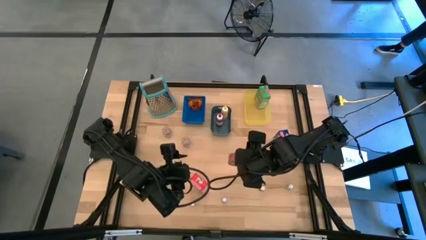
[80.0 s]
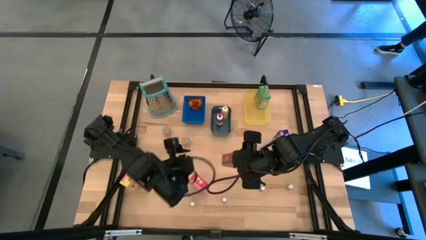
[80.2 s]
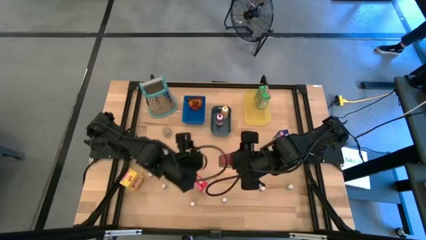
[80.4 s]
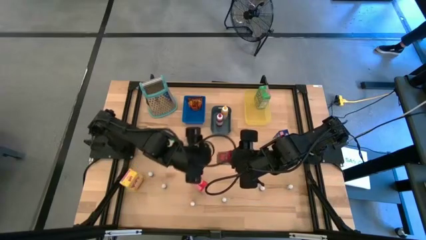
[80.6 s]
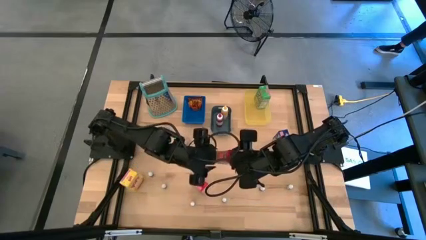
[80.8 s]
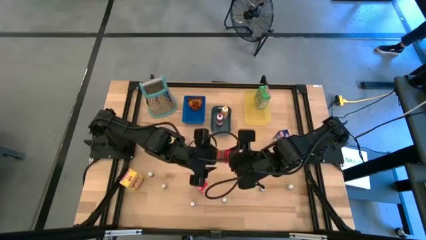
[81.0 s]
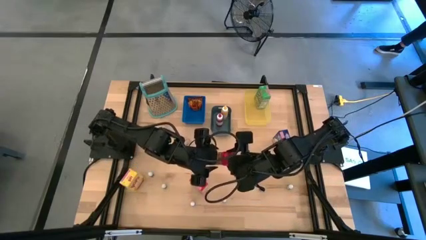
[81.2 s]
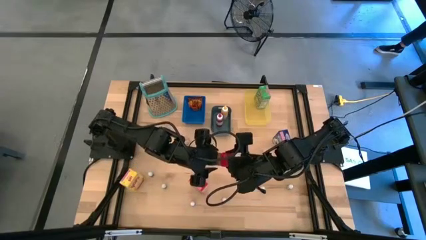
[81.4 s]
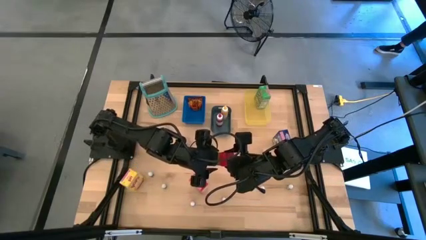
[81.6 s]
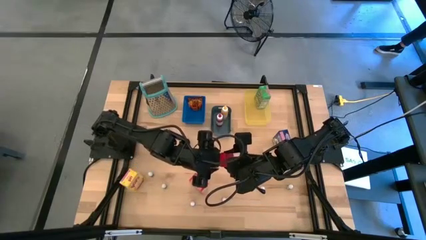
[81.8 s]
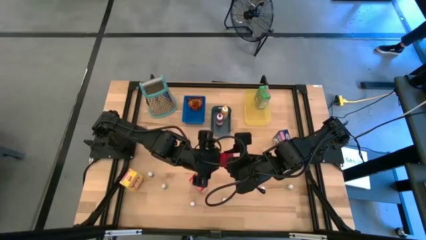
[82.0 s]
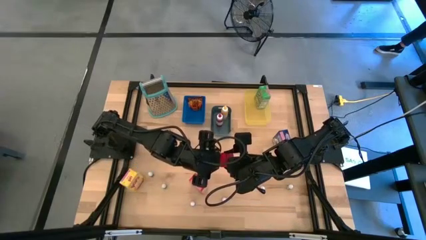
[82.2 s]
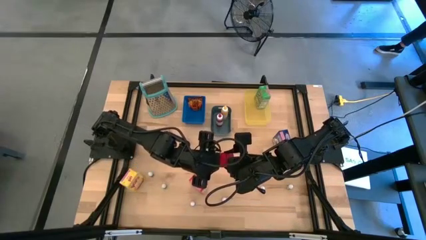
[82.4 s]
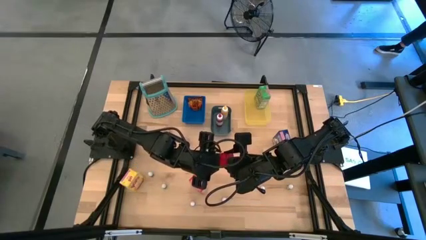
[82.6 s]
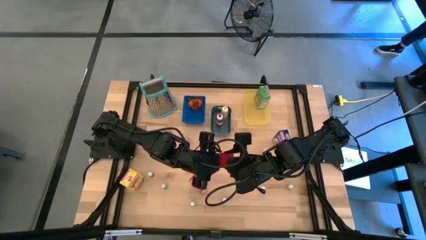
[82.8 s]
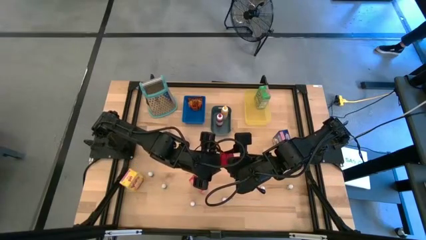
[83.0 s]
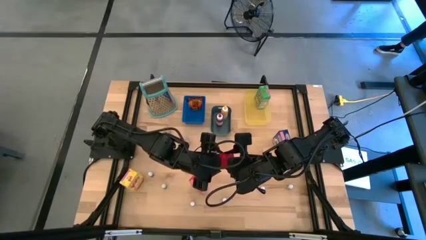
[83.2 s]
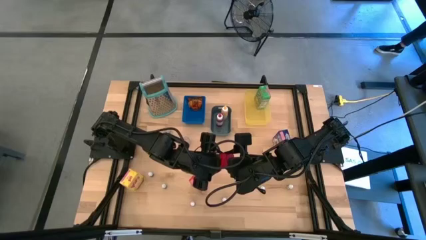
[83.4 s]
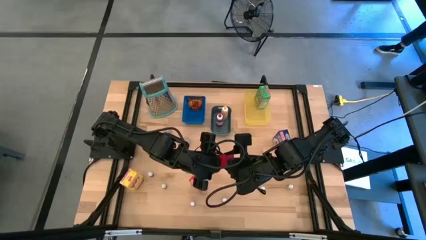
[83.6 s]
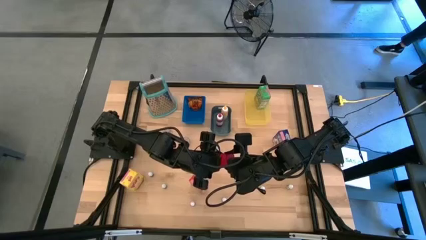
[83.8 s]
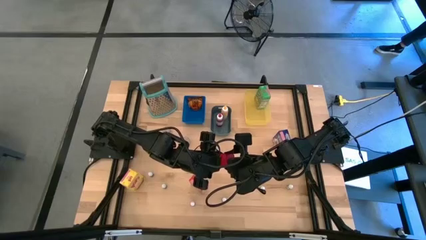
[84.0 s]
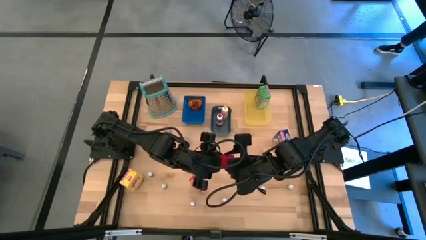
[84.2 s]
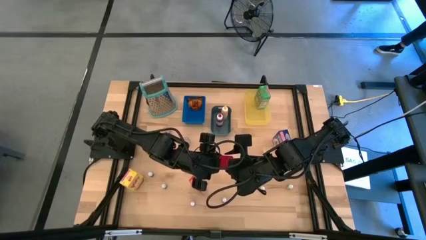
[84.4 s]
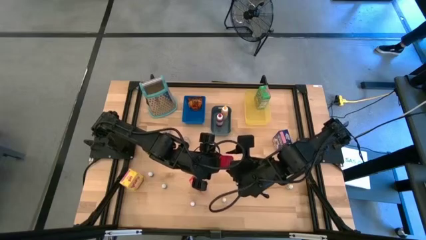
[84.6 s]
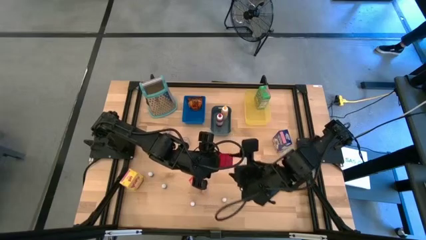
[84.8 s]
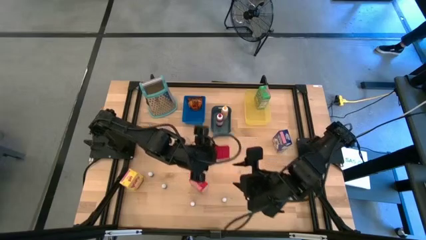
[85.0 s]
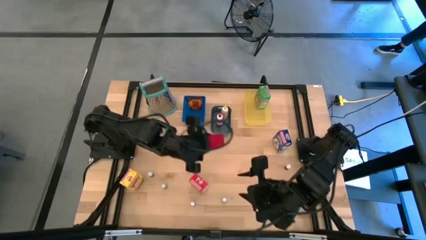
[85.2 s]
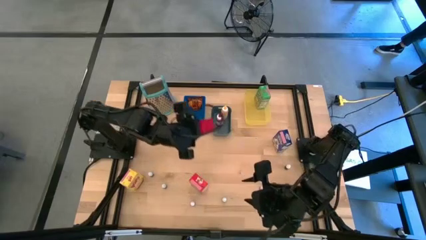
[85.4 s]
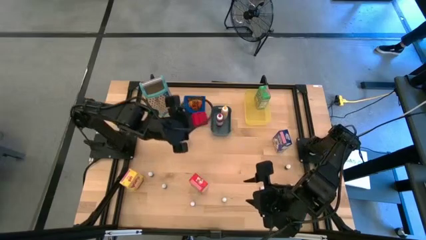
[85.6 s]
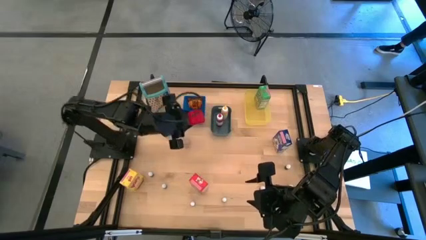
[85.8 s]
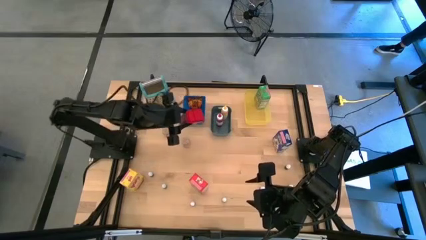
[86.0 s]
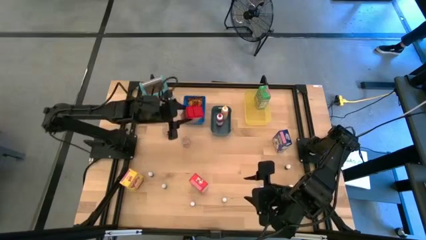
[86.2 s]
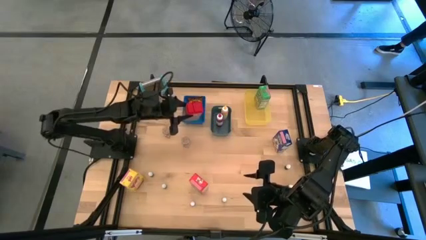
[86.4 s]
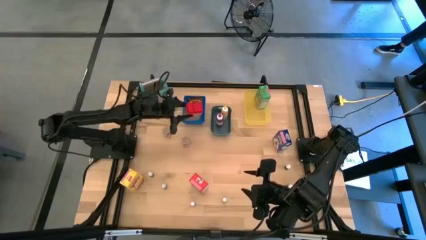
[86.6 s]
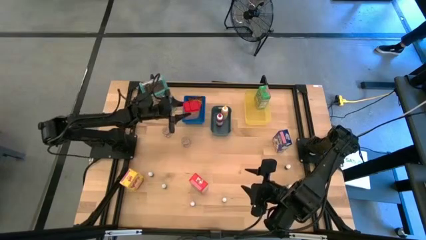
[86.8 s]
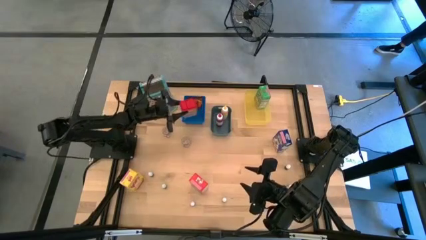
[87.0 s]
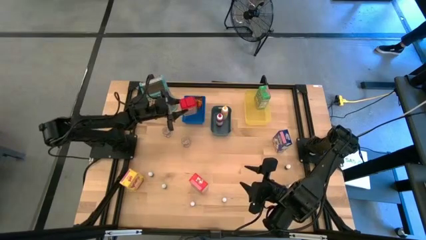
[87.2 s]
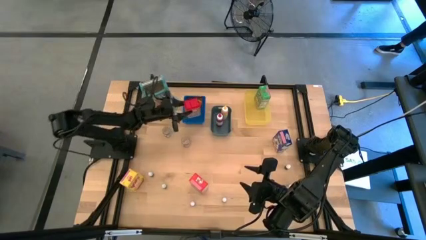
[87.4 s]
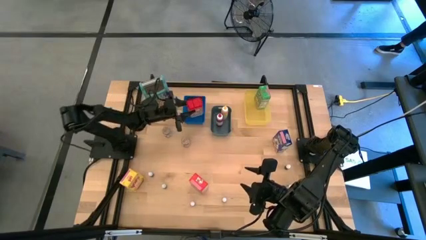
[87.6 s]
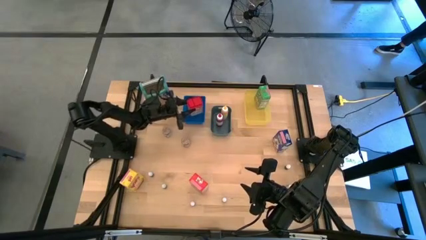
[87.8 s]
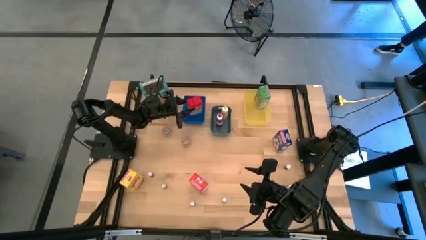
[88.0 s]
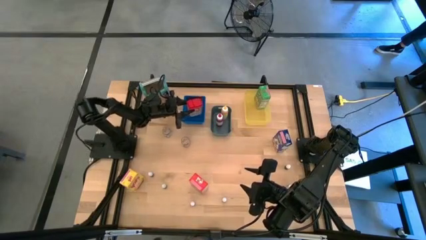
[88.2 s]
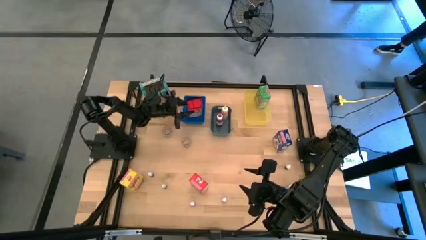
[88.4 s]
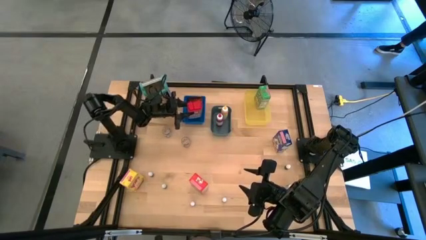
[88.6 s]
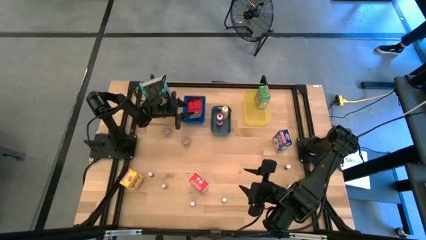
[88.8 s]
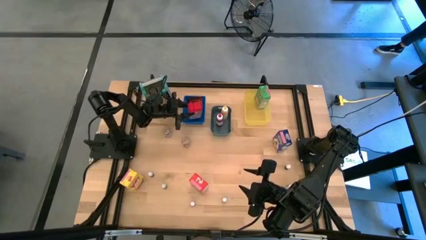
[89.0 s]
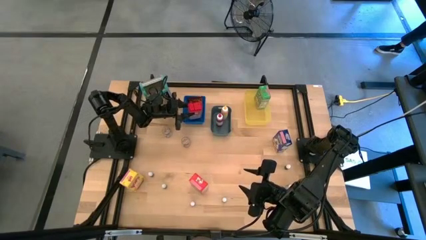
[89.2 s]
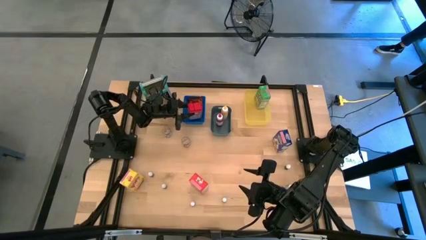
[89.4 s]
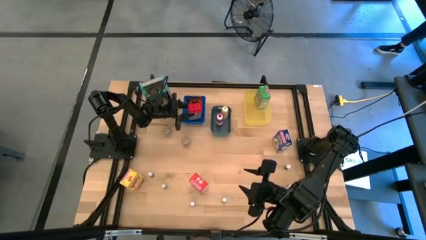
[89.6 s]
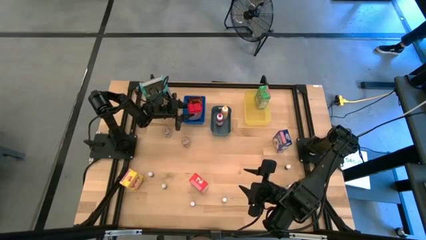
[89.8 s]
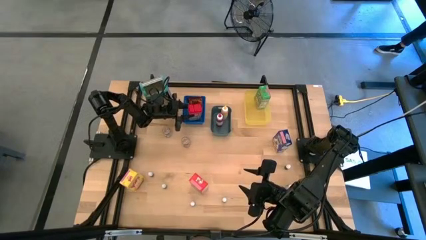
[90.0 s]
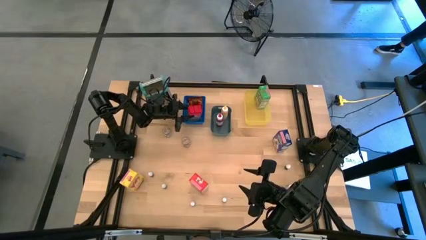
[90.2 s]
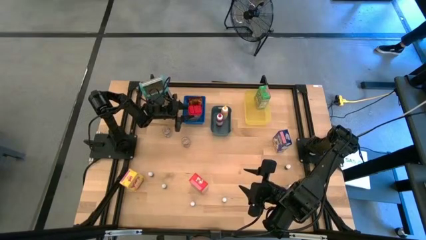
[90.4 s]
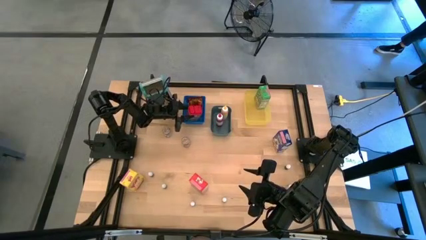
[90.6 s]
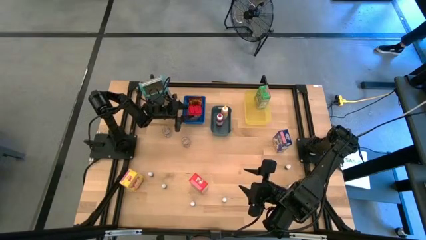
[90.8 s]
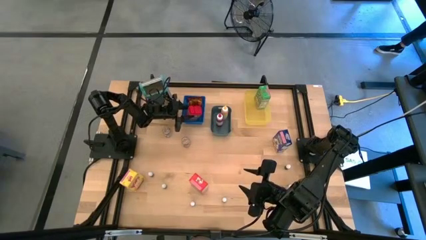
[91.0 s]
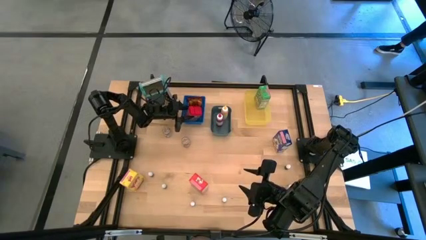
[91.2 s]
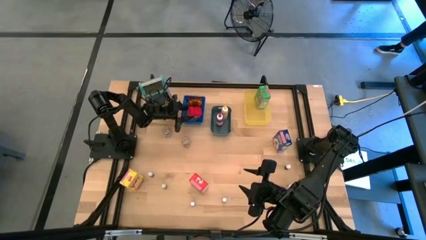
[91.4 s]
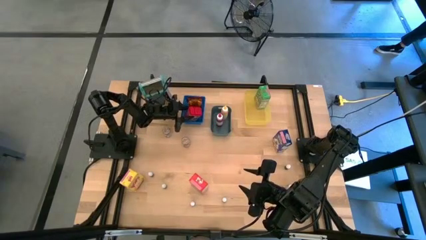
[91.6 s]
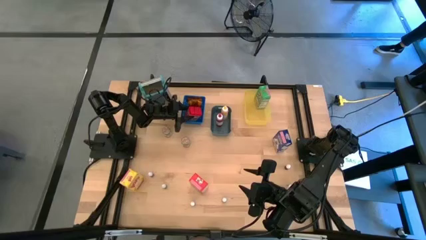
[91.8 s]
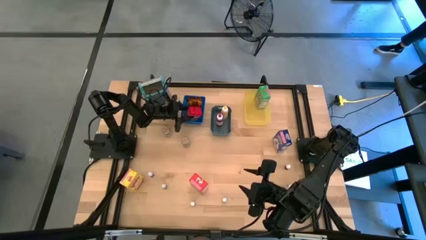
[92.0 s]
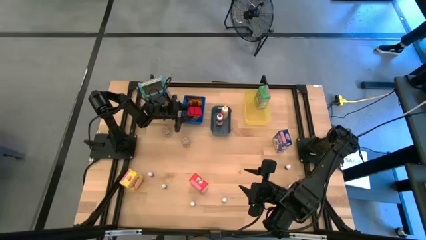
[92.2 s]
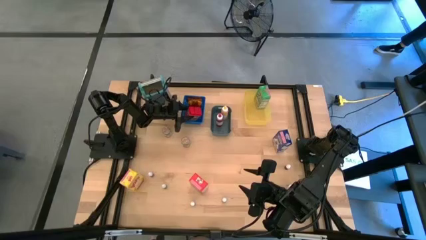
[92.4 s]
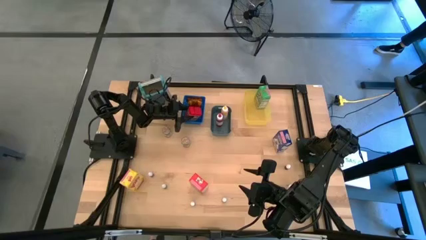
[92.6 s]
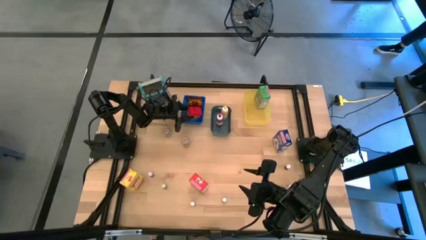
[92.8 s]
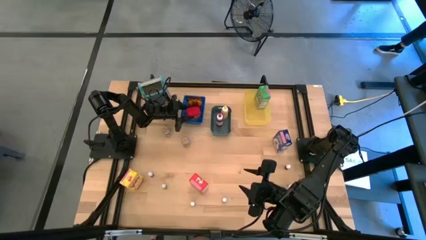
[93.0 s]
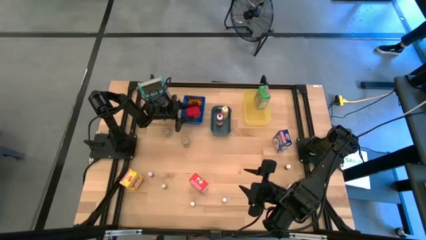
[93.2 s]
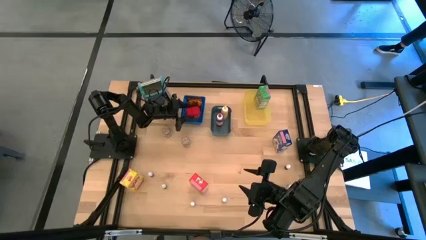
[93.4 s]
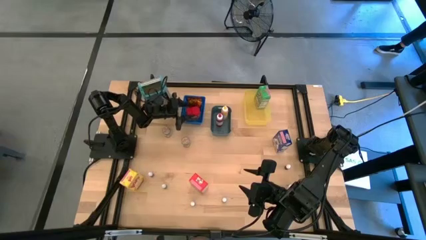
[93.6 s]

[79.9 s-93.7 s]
Task: Pick & Place Kitchen Items
Put the red seasoning can into the blue bin

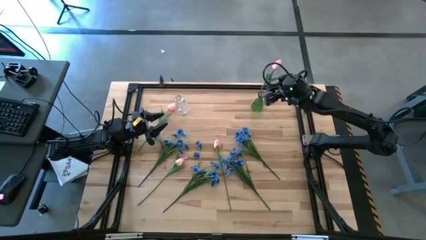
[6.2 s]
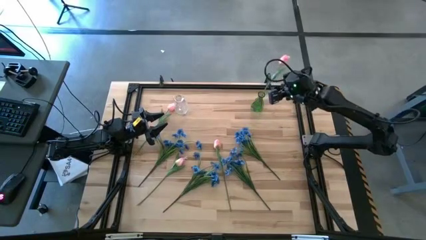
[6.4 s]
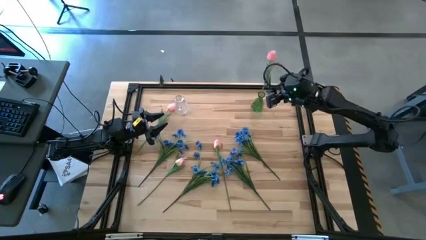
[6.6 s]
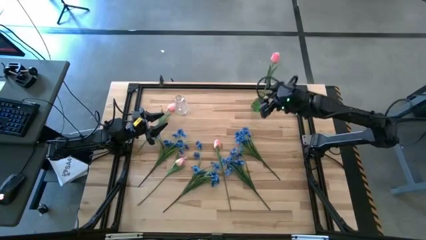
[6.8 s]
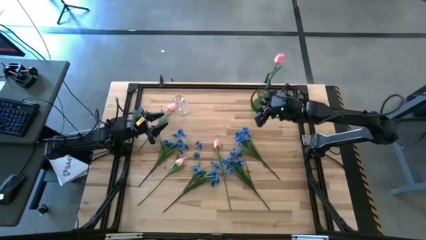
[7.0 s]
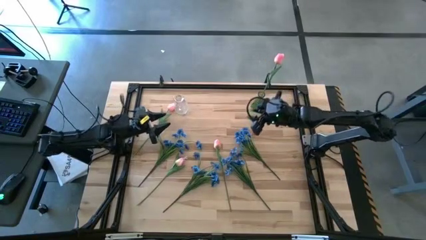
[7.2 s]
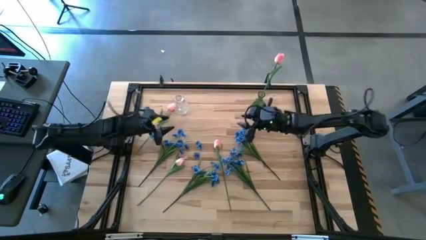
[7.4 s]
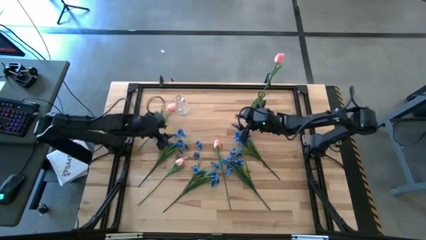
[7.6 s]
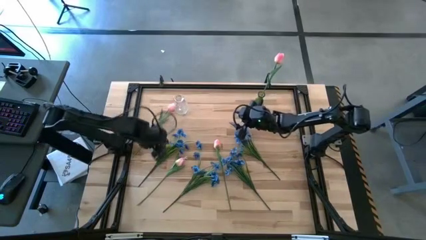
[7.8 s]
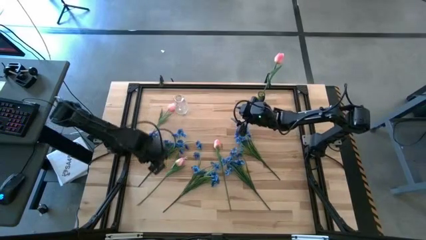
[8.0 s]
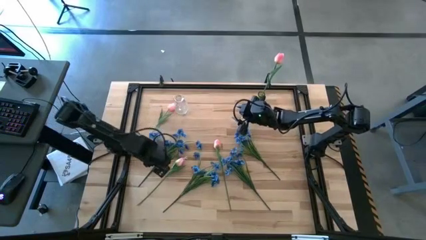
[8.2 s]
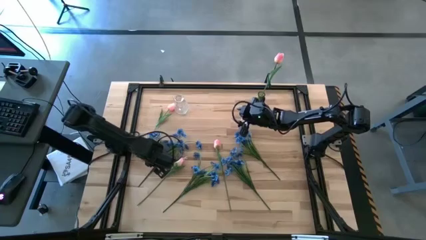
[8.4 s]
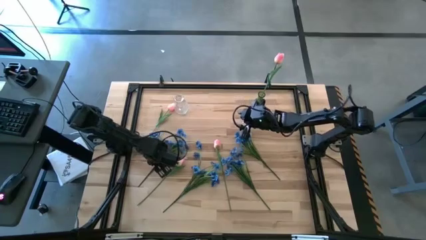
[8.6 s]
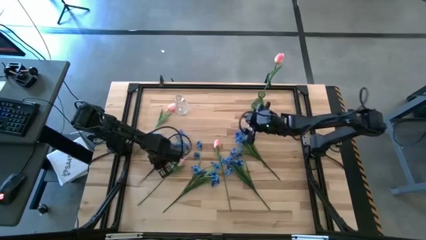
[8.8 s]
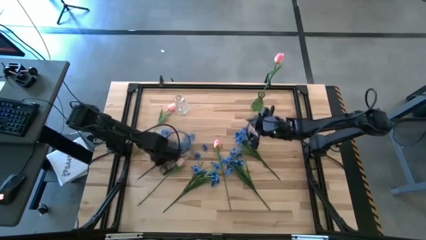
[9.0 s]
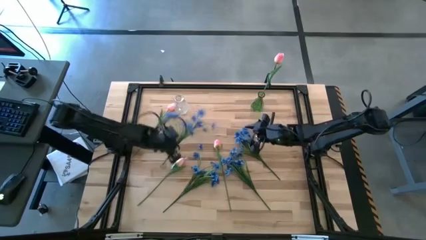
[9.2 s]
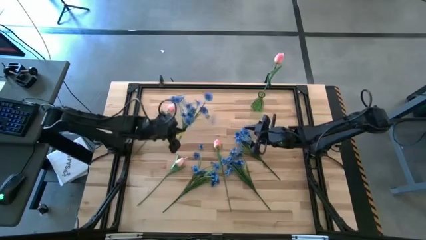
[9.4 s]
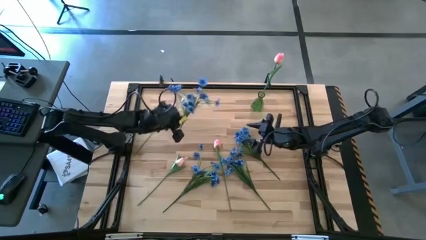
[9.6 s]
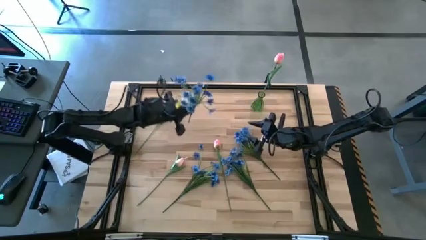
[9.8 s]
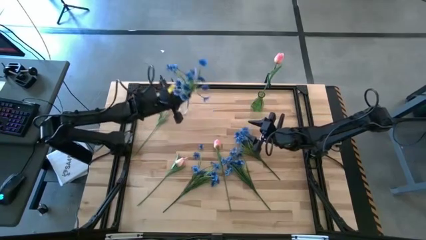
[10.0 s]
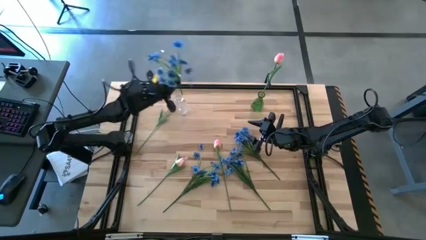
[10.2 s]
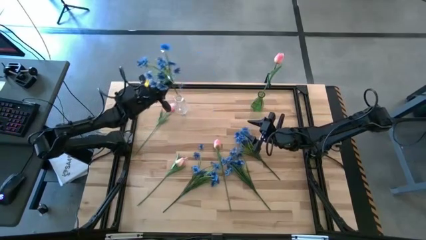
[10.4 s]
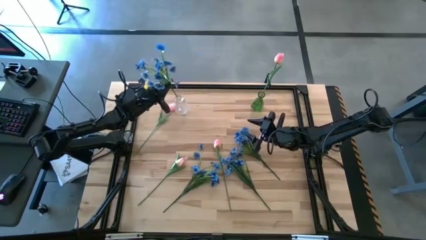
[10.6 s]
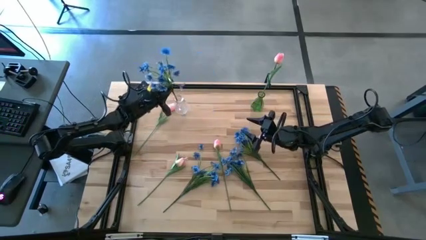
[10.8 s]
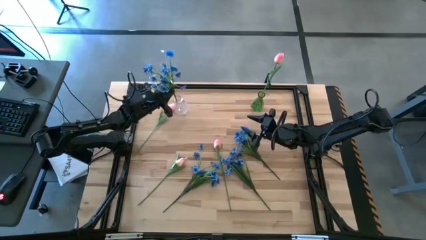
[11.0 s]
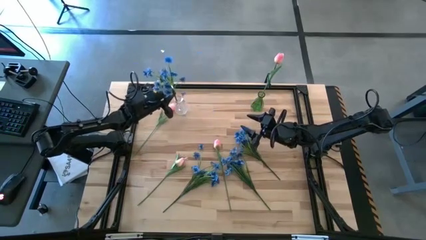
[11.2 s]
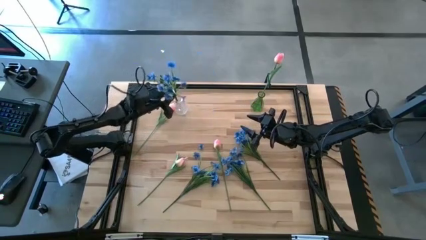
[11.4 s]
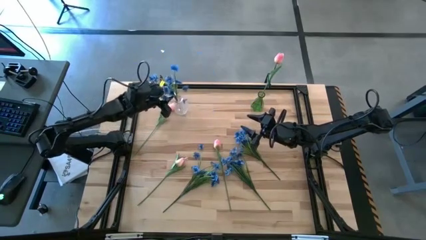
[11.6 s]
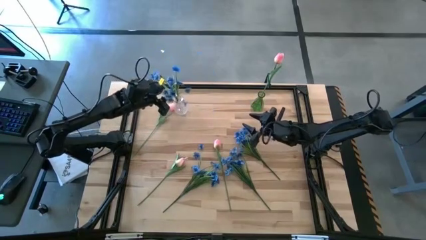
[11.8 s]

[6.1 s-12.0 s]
Task: Sort flowers into vase by color
Put the blue flowers into the transparent vase
